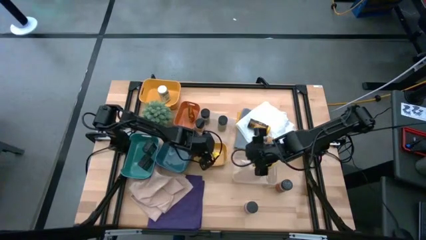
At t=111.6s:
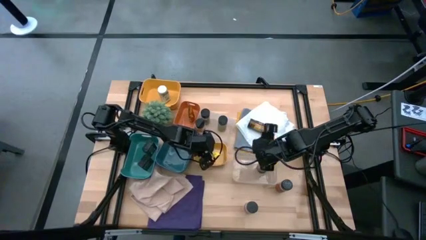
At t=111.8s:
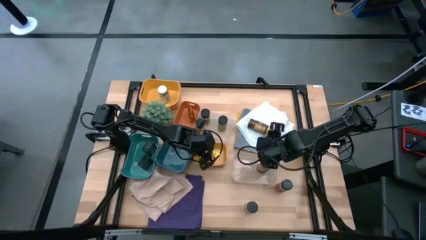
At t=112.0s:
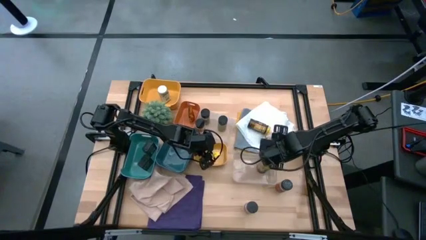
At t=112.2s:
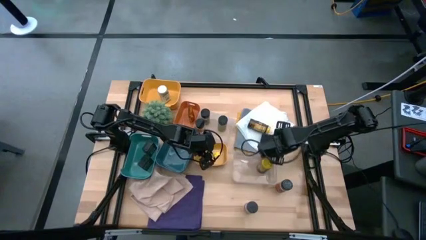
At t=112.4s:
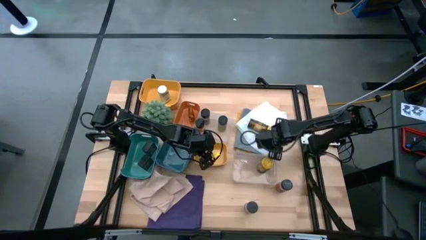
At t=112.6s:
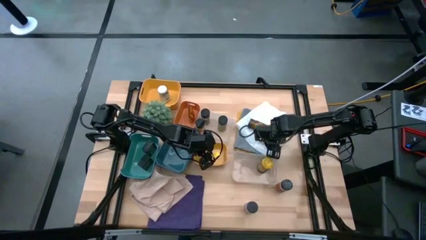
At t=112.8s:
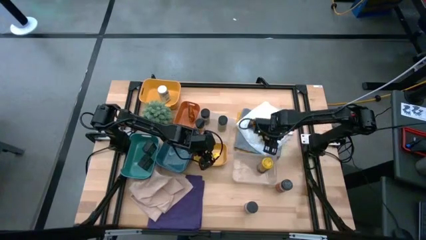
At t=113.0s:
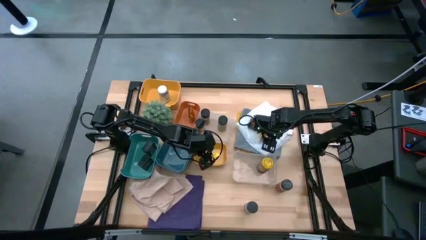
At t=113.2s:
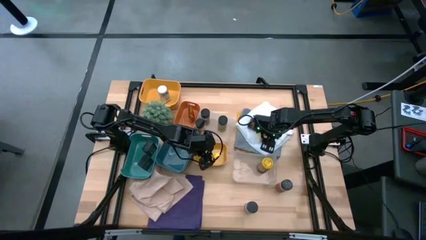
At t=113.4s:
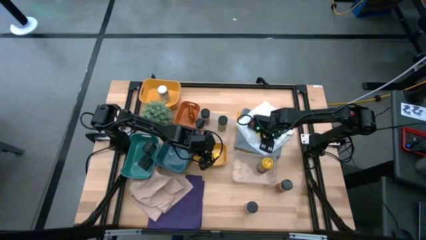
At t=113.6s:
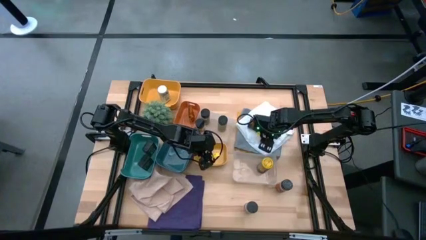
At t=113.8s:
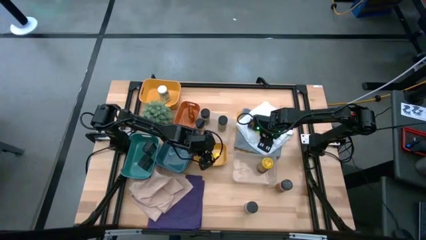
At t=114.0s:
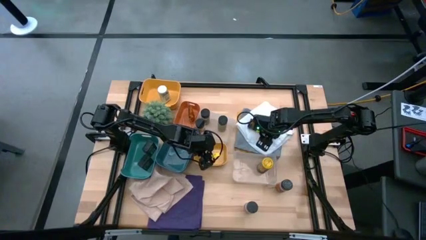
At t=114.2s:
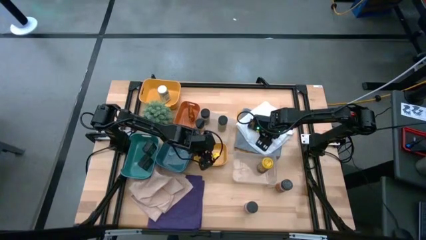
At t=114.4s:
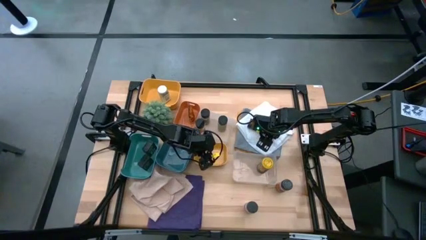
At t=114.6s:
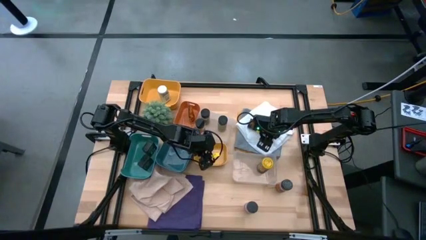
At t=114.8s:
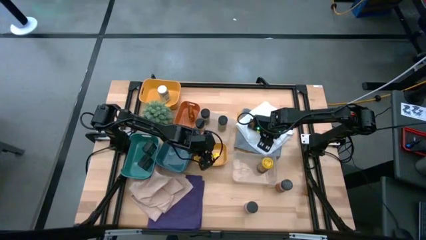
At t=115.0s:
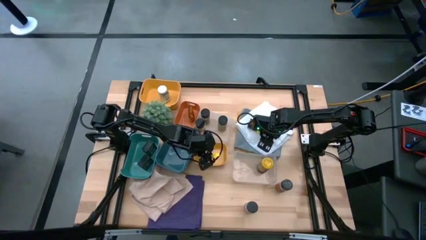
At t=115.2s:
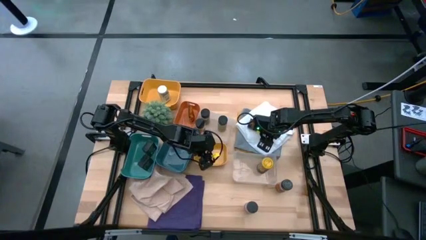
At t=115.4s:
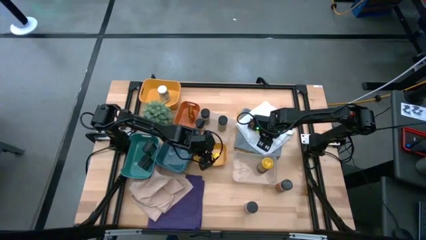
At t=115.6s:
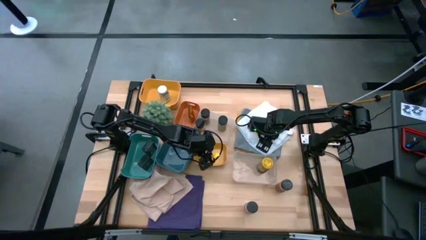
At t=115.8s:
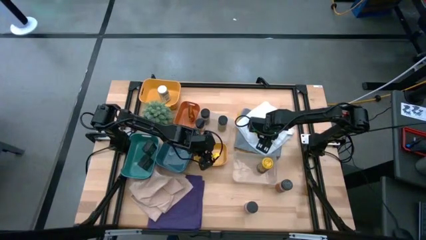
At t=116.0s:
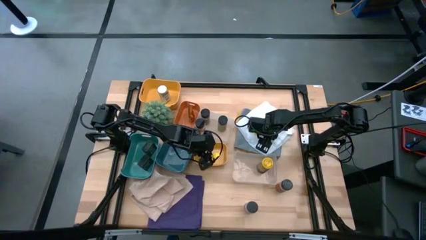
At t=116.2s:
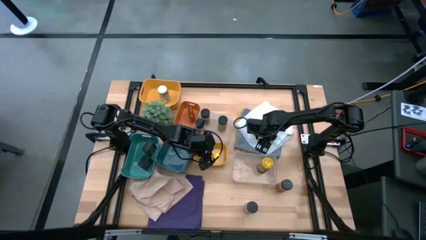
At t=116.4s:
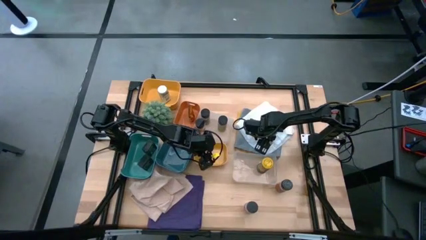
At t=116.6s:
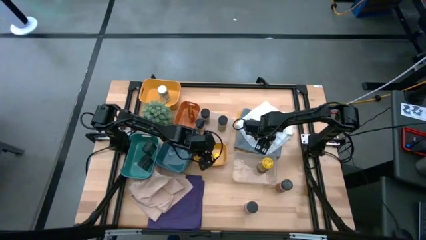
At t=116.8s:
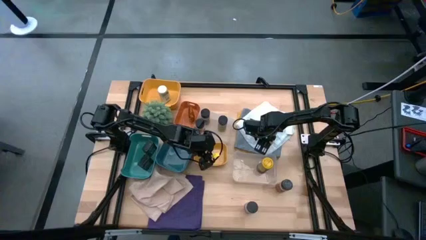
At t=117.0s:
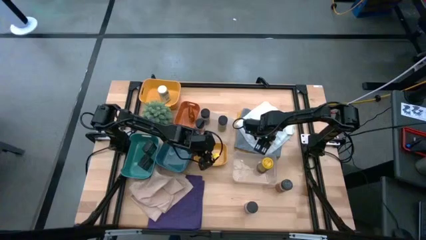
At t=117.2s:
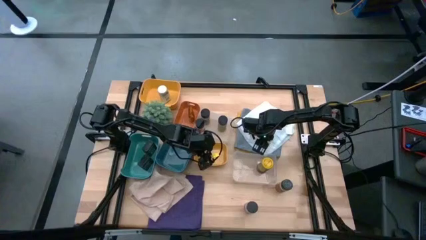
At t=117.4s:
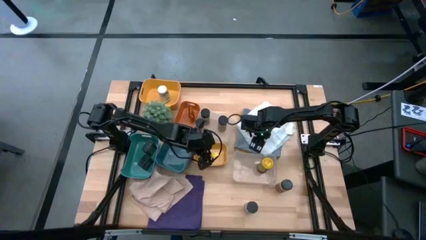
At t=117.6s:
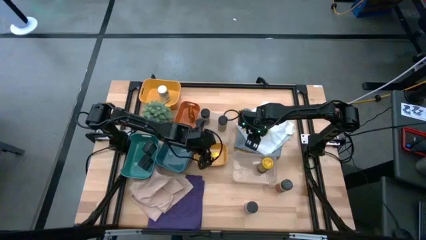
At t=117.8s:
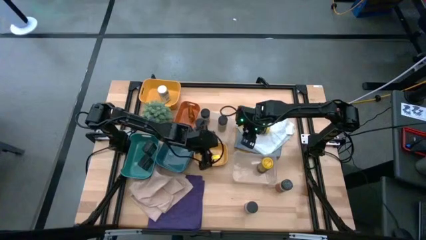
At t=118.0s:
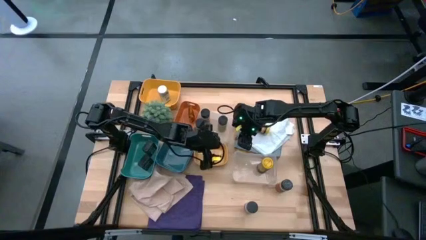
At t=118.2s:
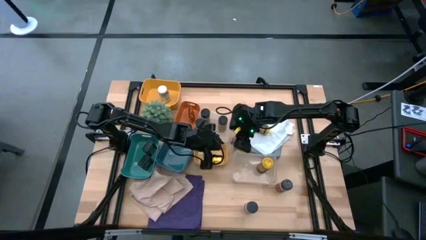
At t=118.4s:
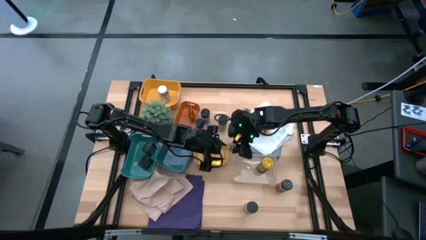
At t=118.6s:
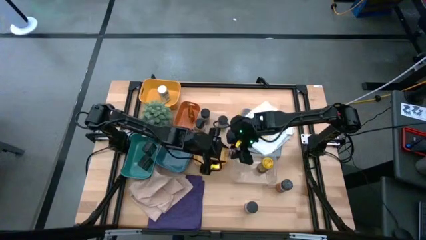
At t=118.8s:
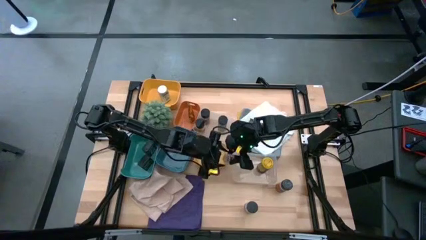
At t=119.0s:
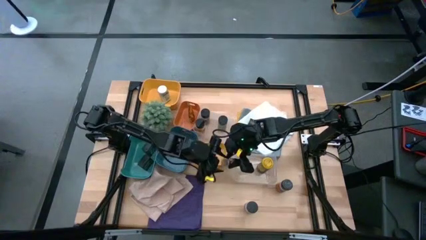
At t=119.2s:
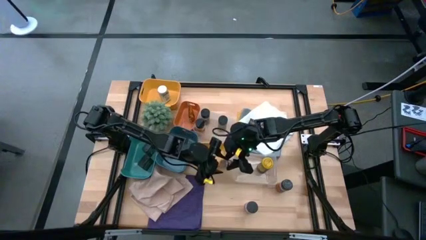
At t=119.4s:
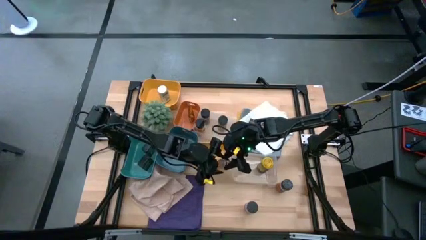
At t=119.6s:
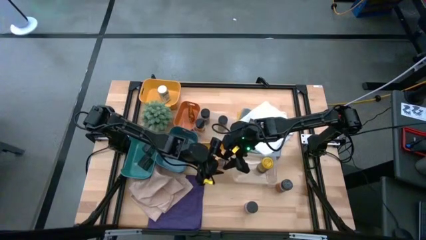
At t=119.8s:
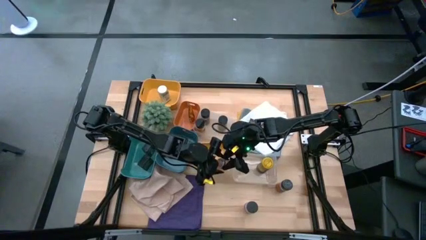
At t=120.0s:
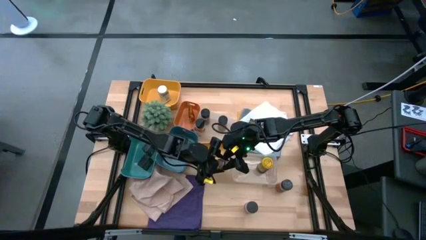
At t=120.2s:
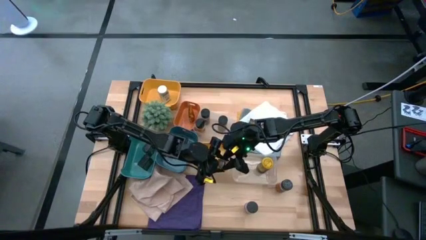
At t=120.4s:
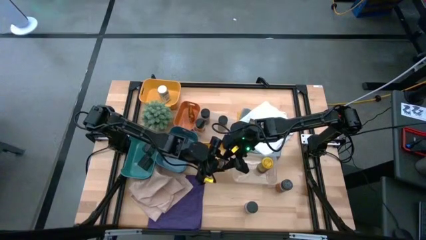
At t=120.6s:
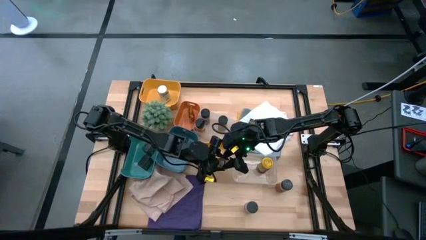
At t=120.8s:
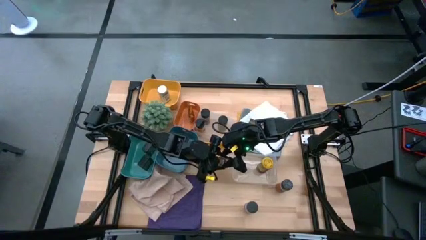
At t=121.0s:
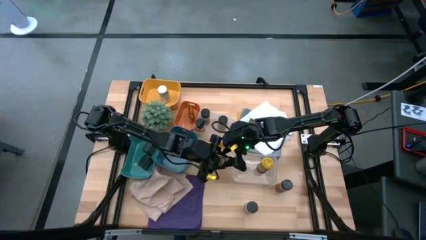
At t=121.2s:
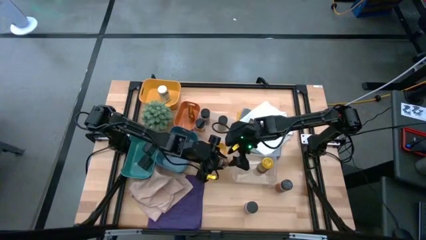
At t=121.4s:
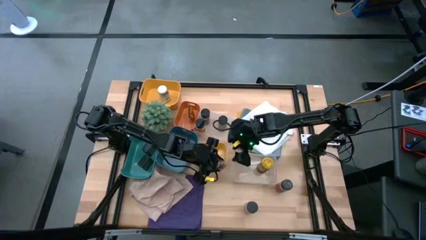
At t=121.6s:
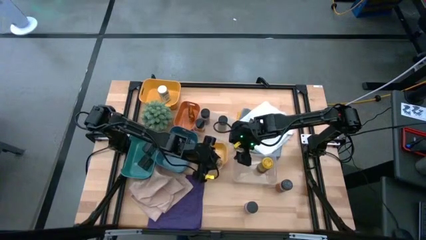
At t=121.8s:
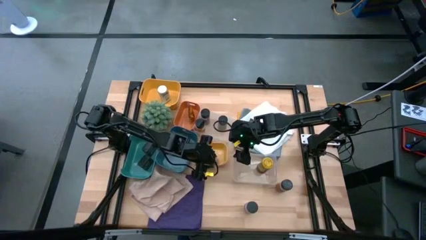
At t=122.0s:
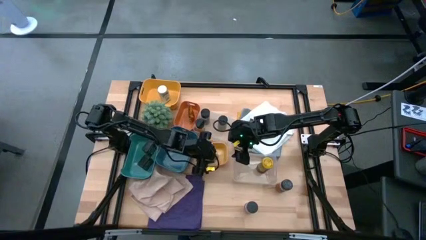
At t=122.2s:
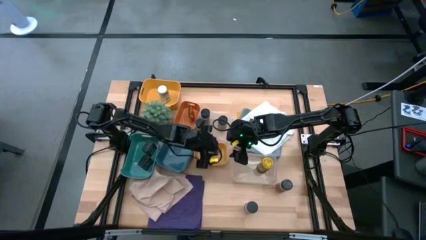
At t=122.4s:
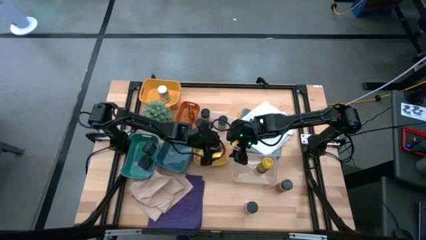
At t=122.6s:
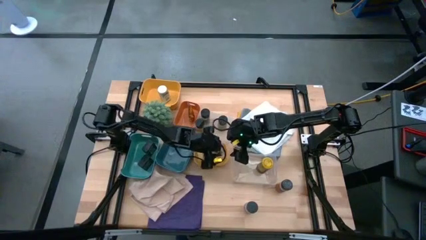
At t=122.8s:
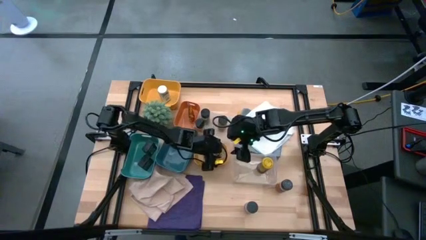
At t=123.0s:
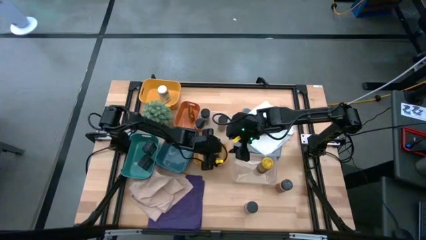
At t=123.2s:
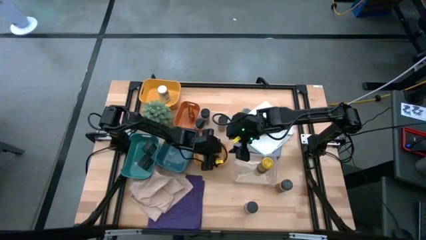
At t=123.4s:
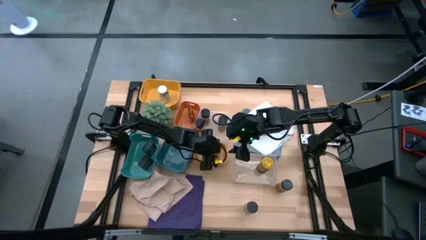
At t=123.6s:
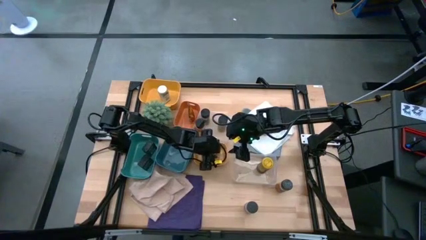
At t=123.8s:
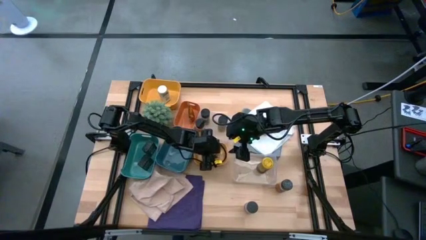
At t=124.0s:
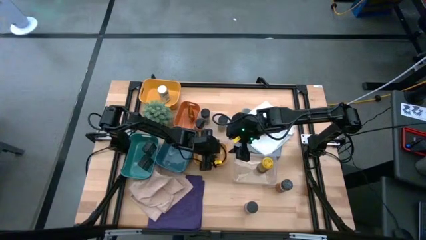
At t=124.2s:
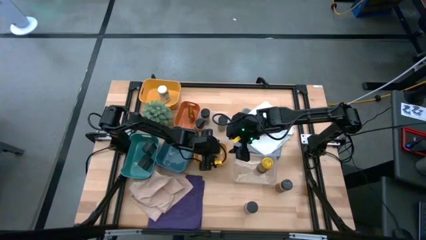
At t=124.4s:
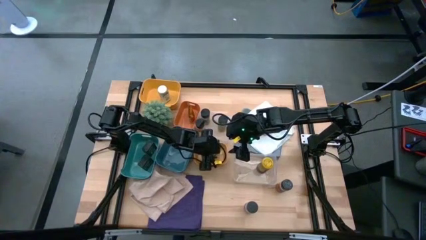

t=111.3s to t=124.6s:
Task: Sort spices by type
Put the brown seasoning bottle into the bottom yellow bin

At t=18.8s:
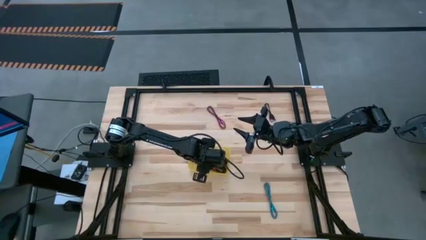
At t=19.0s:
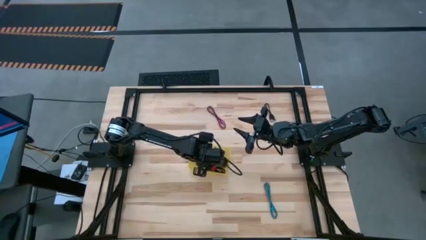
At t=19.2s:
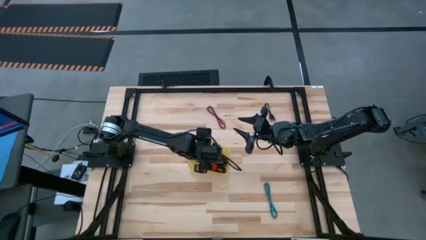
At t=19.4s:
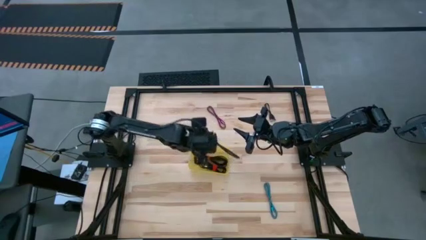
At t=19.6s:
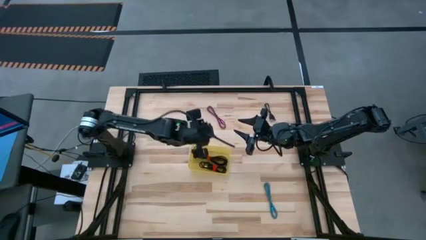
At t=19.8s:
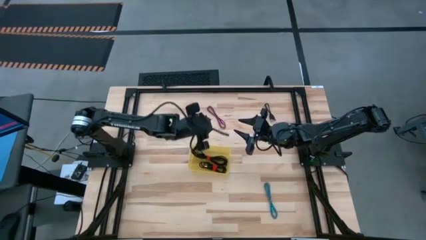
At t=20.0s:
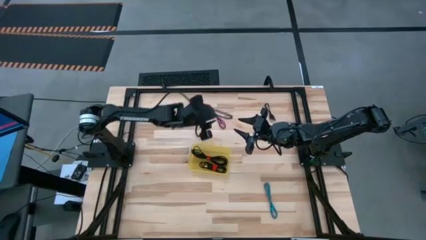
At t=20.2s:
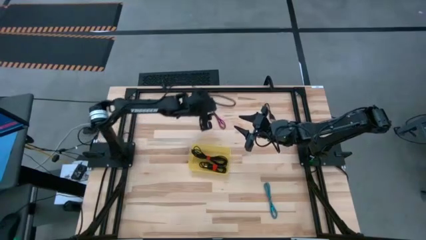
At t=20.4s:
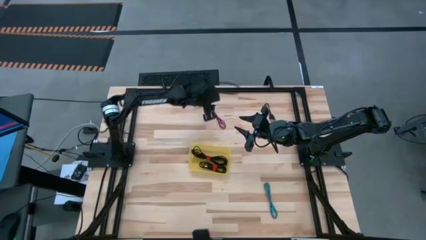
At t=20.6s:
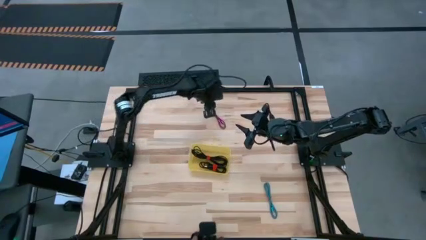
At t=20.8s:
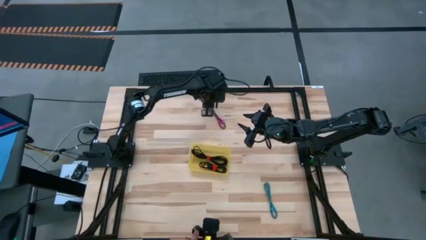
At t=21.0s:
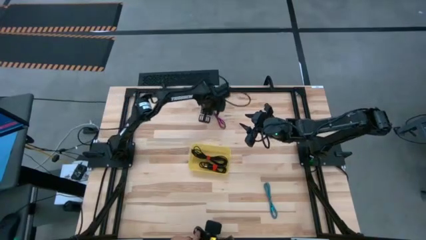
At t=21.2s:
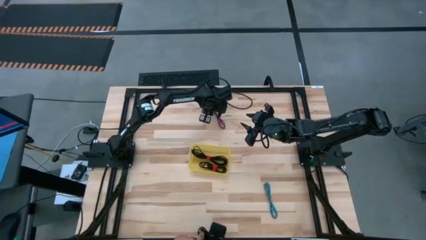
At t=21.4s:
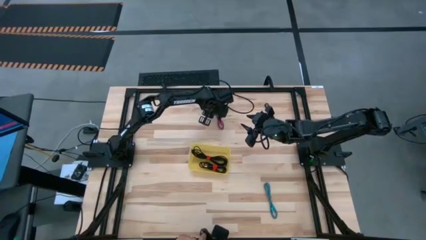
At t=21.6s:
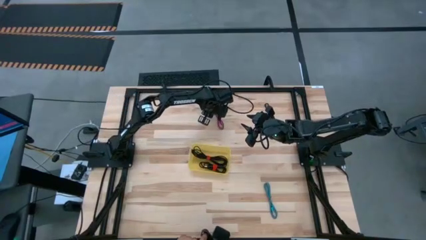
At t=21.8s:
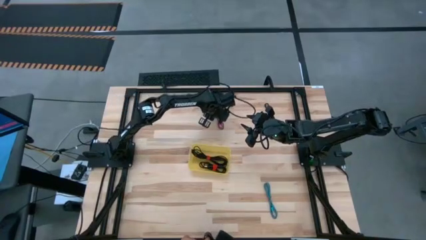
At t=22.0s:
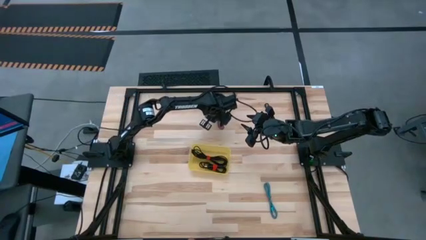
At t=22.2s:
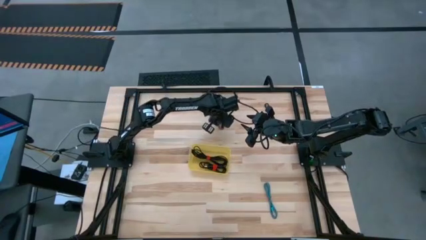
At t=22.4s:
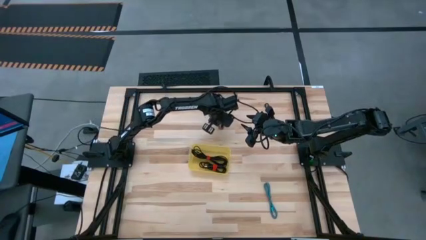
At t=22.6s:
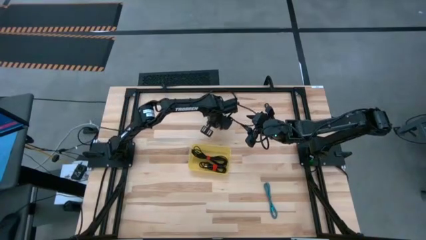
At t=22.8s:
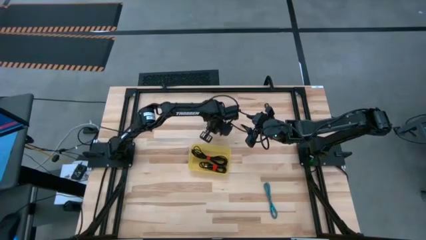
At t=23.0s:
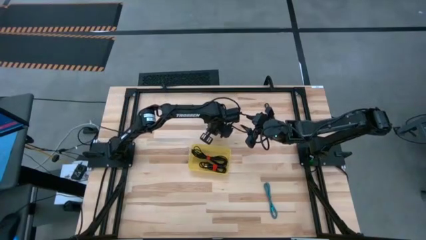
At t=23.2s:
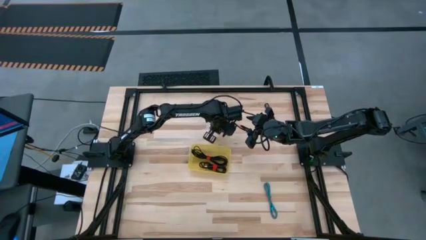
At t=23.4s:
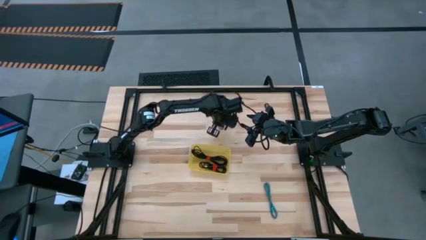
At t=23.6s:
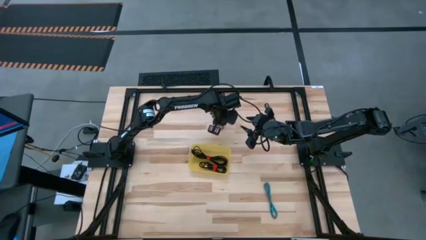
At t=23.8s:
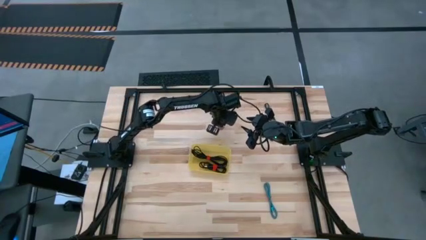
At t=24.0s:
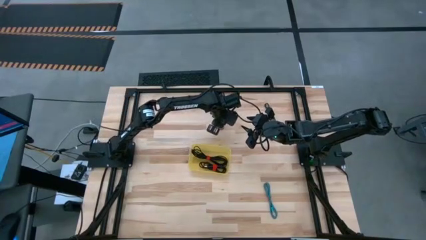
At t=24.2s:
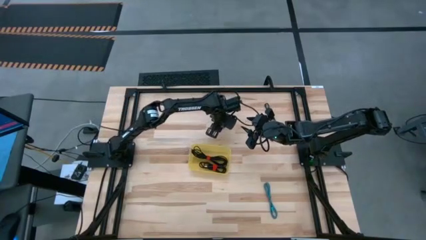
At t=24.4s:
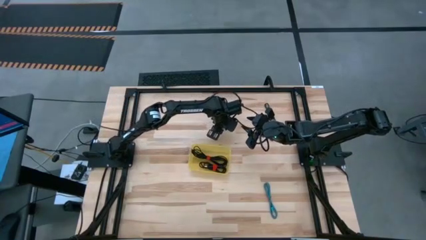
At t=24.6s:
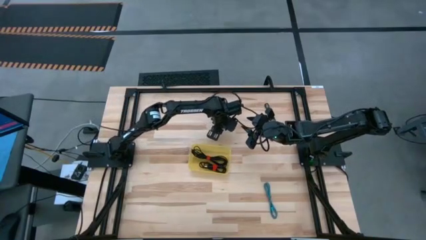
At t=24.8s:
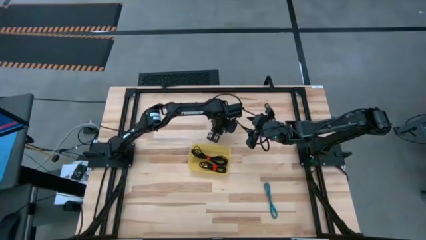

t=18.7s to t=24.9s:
Task: Pick and place USB-C Cables
Put the pink charger cable into the yellow bin
